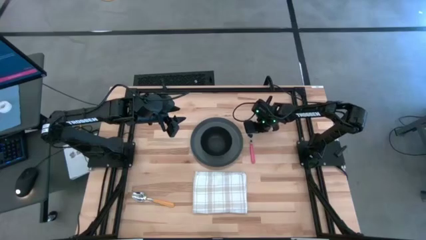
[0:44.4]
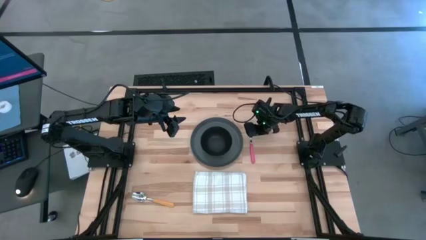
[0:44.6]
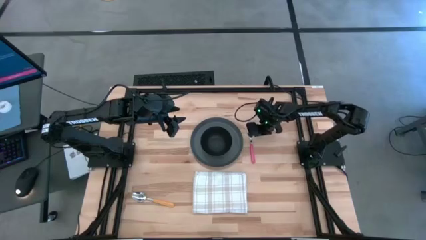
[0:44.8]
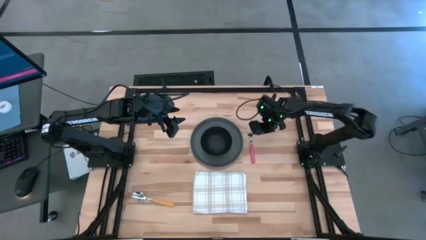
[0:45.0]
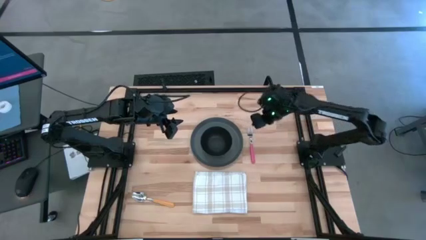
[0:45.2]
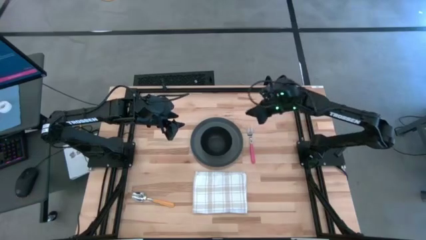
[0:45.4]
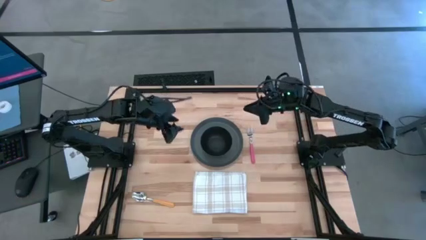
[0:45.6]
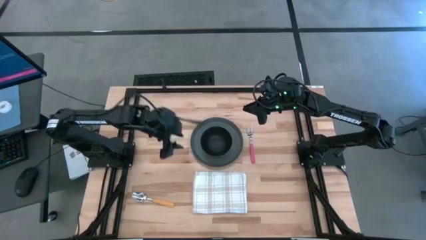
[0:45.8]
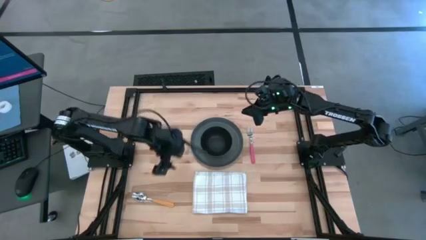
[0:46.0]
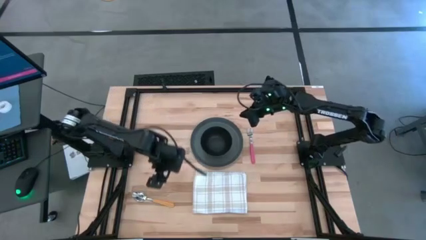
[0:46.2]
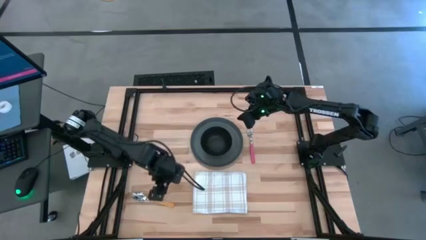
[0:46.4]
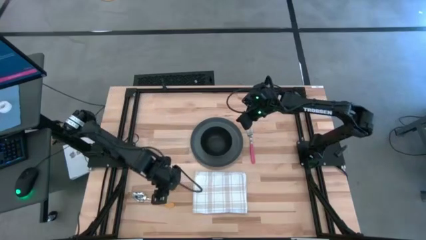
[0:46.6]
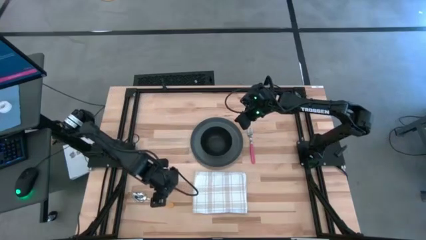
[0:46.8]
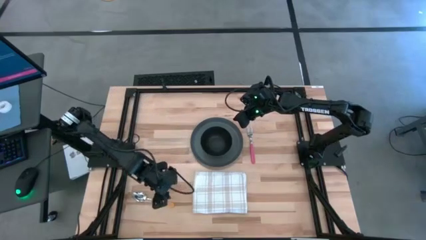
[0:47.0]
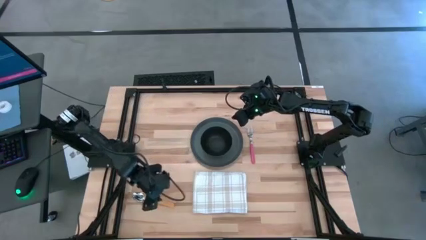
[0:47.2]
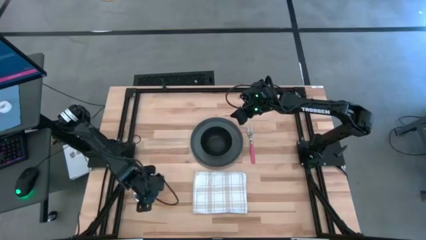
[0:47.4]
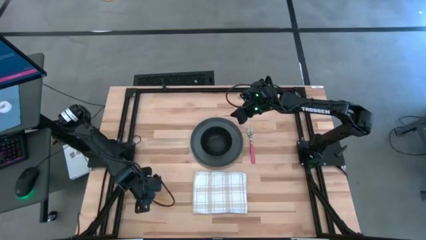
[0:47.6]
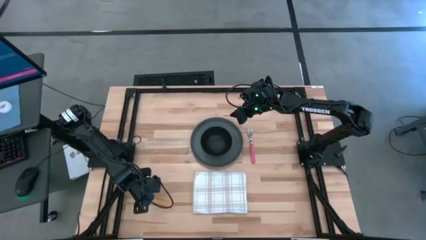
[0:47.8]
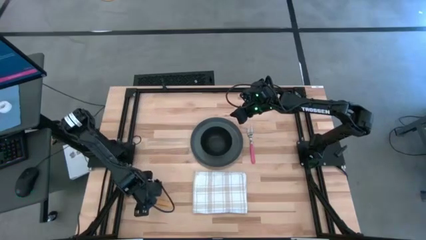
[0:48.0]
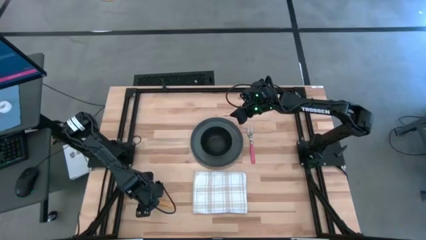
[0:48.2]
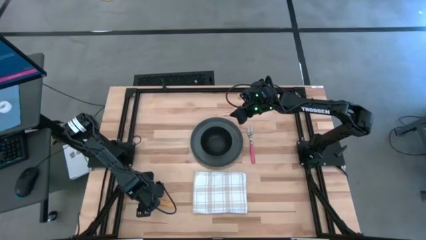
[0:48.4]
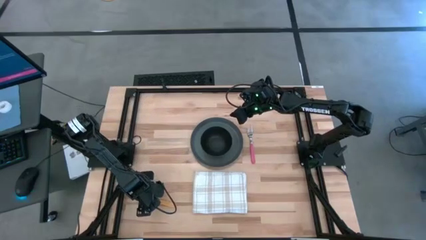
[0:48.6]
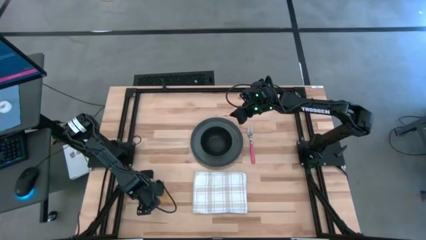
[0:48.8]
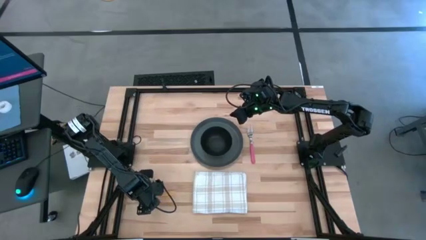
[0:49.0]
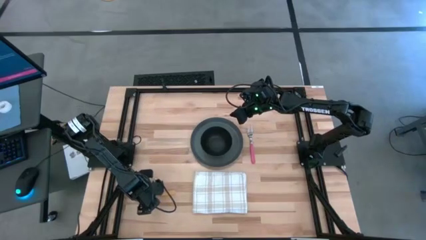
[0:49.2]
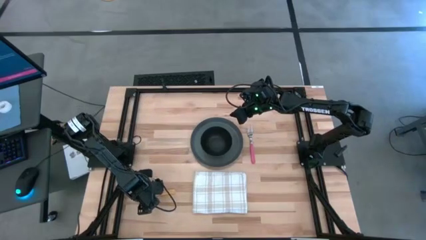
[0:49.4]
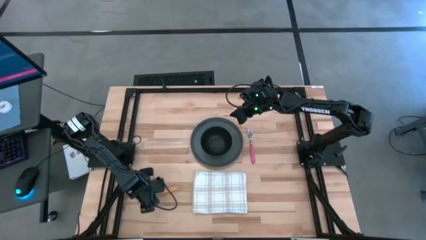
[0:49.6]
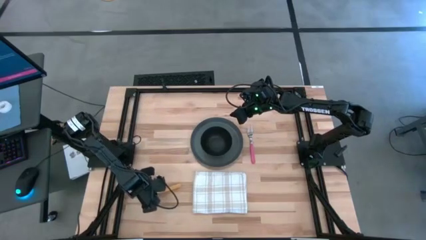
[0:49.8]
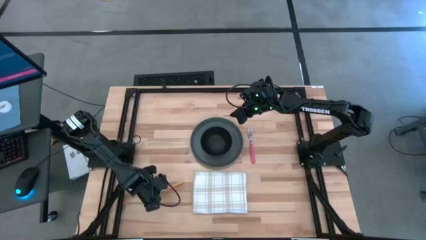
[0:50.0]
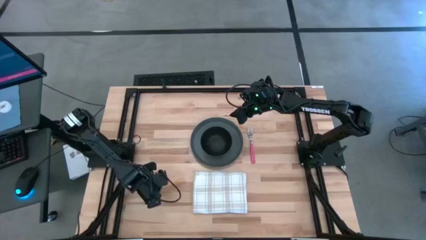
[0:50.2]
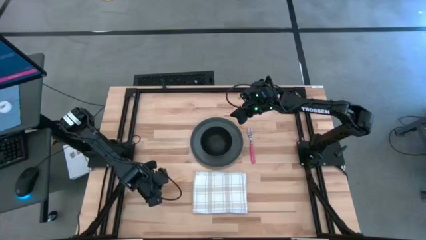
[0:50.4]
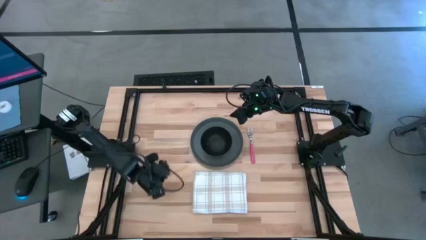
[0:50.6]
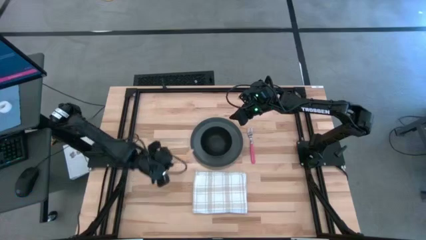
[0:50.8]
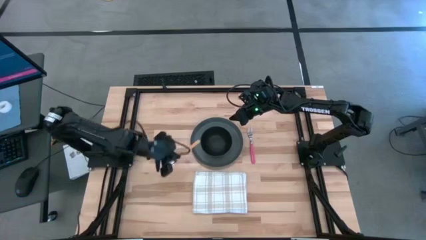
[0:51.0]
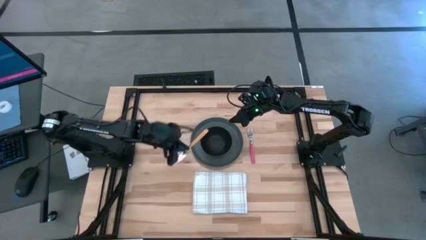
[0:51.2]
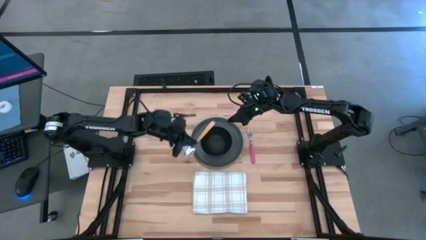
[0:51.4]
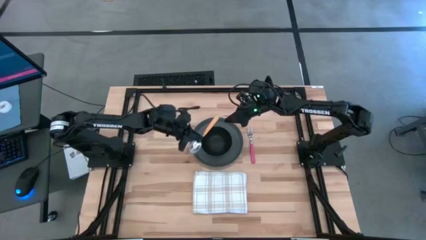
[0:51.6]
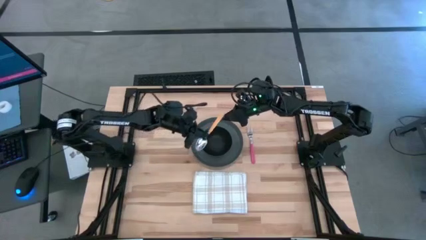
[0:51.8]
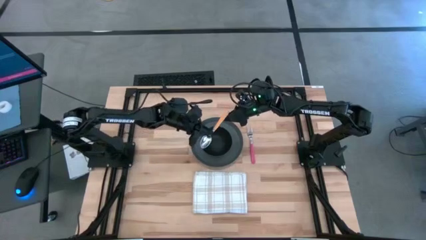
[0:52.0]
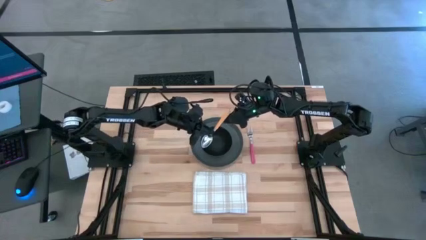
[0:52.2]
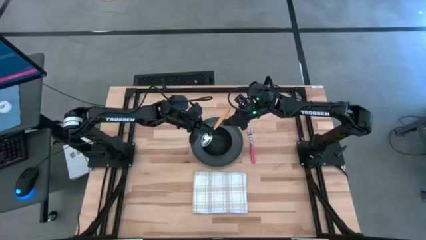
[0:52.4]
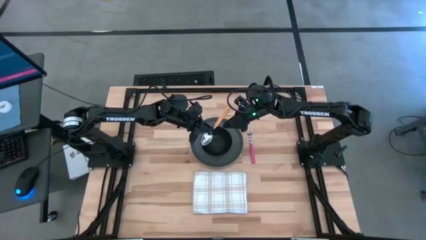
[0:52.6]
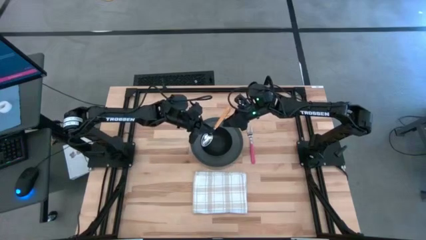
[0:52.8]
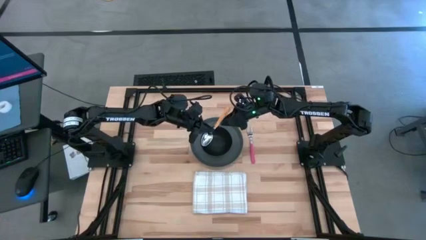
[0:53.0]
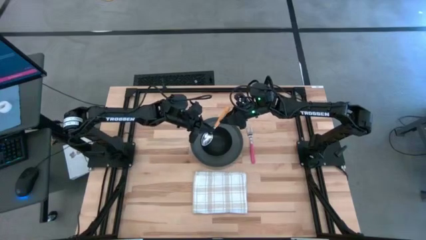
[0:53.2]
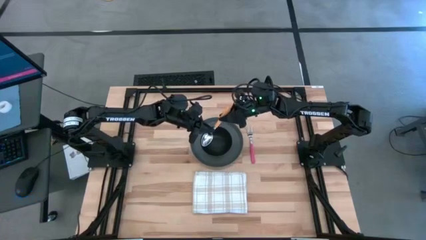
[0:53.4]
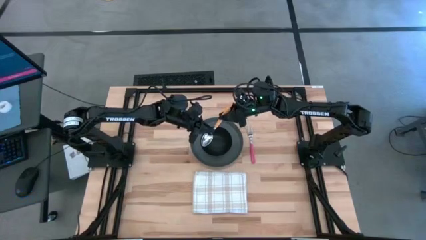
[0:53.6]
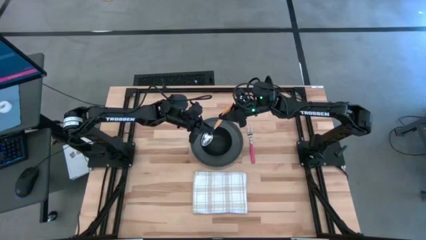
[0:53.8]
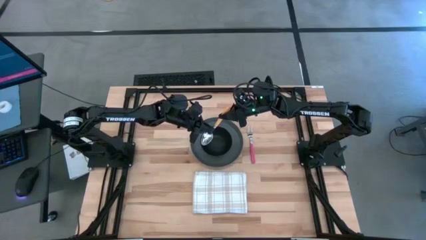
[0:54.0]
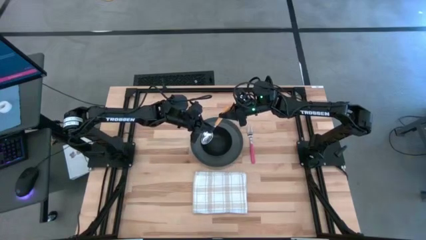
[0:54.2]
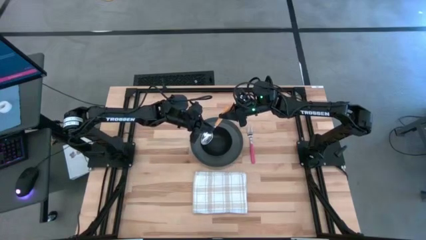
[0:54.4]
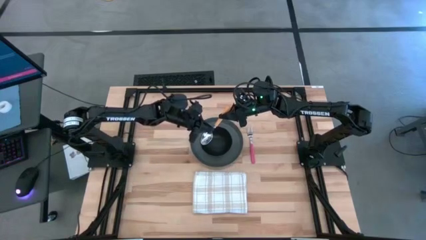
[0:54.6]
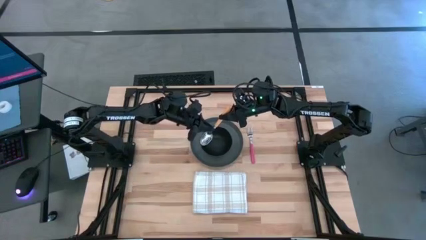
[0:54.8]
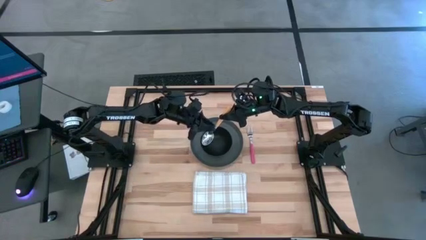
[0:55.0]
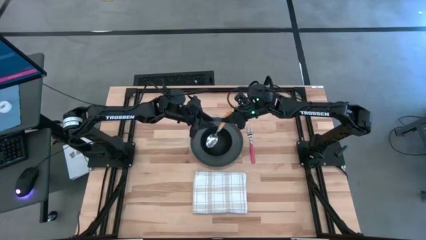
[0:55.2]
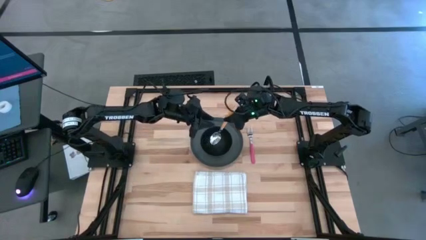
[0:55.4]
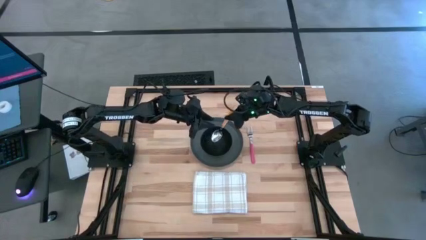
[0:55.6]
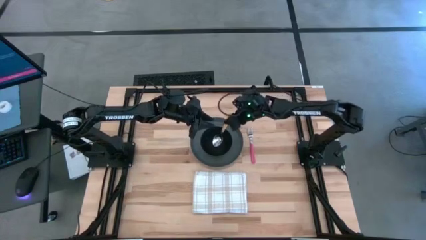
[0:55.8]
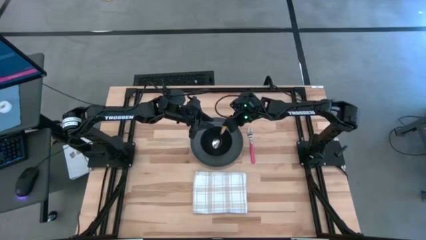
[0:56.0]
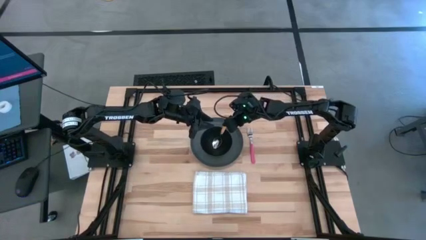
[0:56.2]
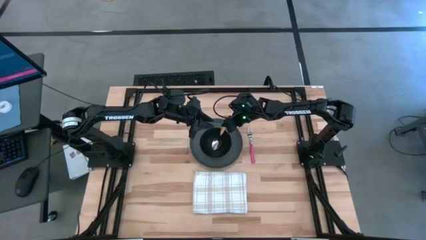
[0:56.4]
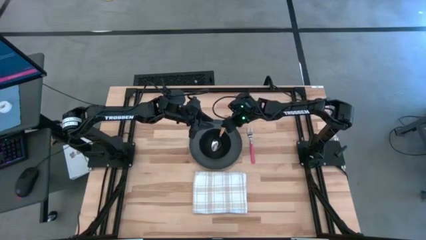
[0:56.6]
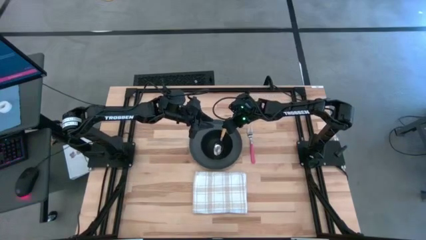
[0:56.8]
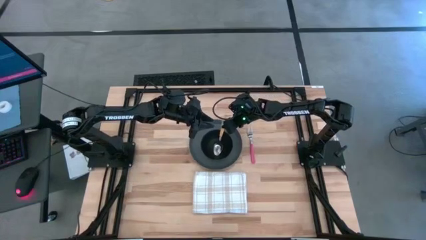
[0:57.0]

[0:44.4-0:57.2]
Task: Set table place
Put the yellow spoon into the black bowl

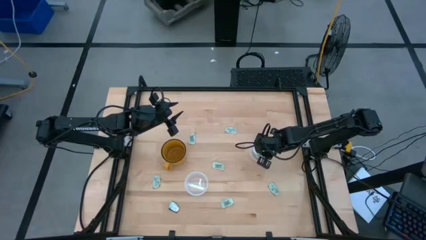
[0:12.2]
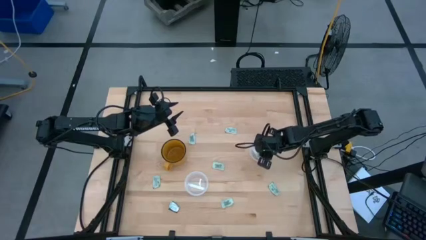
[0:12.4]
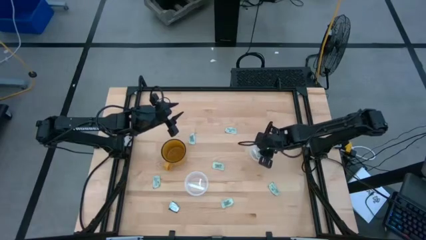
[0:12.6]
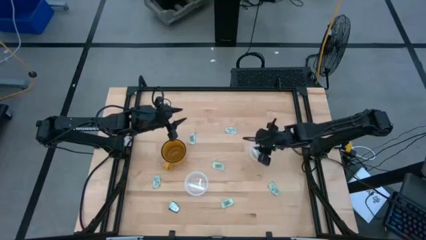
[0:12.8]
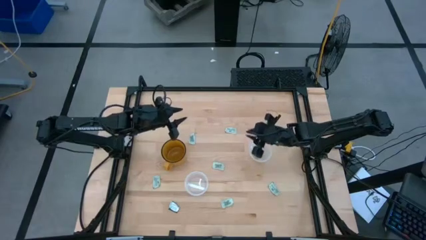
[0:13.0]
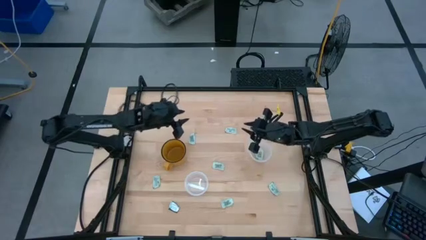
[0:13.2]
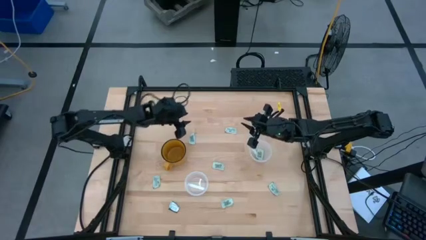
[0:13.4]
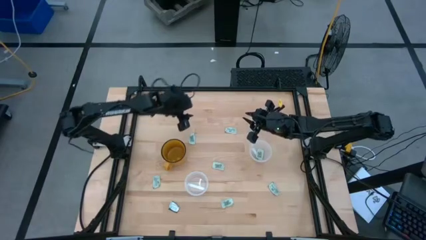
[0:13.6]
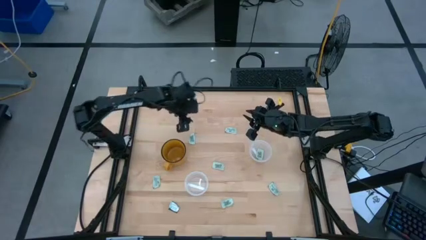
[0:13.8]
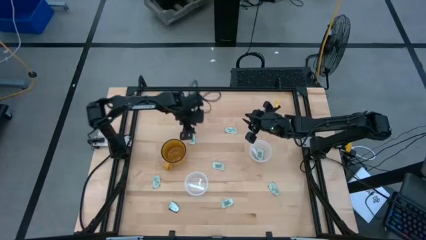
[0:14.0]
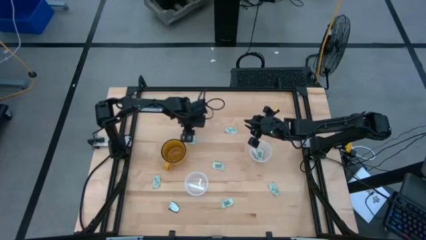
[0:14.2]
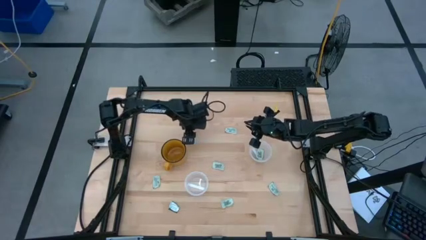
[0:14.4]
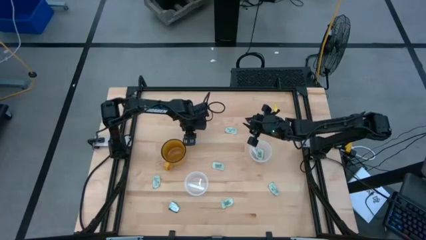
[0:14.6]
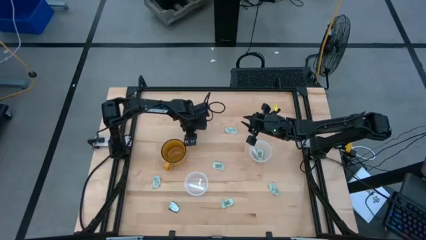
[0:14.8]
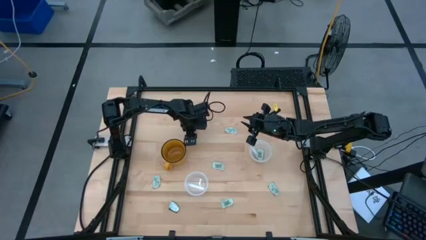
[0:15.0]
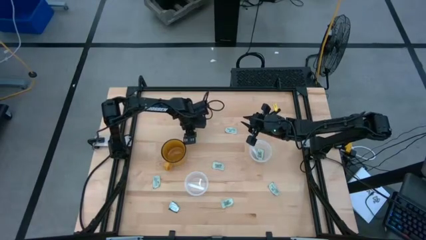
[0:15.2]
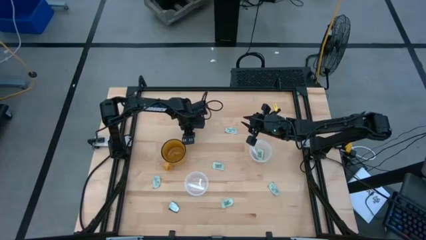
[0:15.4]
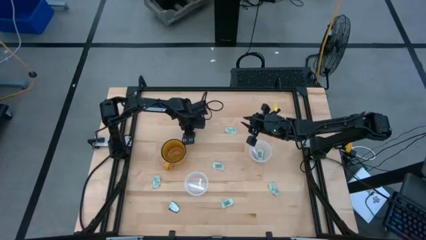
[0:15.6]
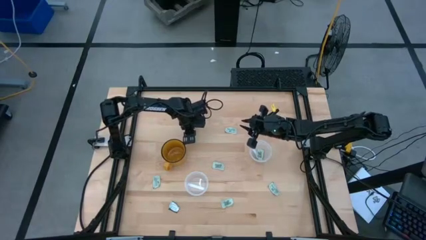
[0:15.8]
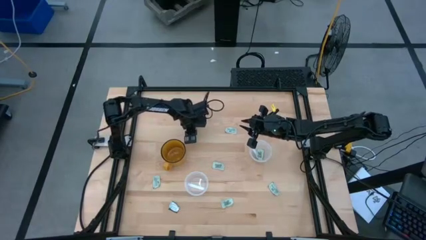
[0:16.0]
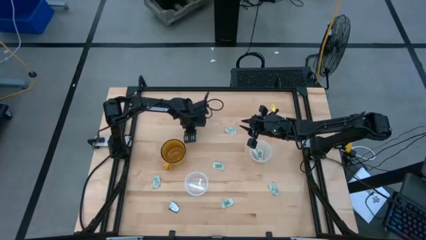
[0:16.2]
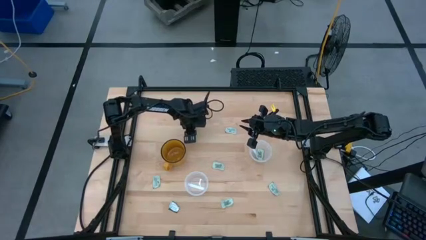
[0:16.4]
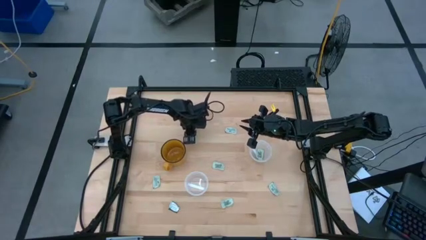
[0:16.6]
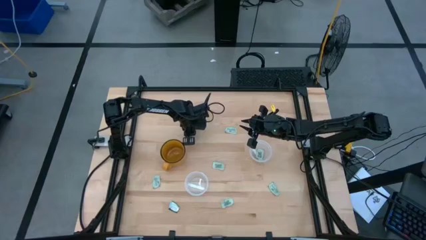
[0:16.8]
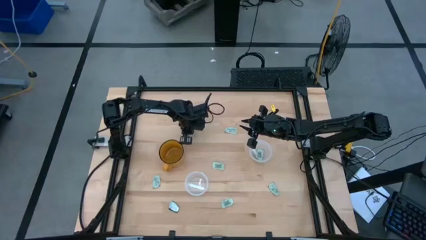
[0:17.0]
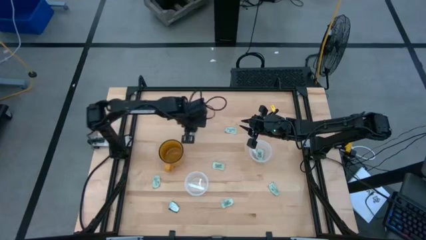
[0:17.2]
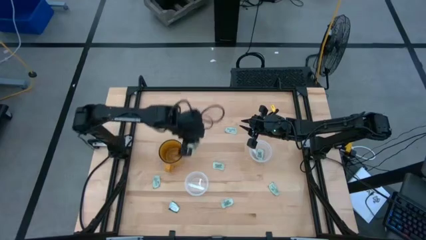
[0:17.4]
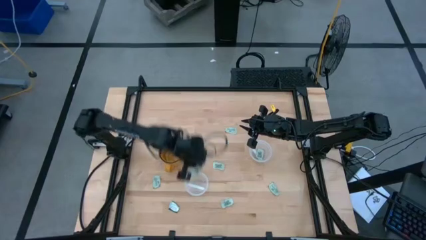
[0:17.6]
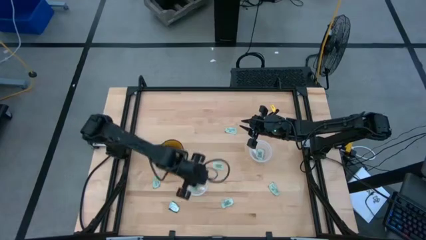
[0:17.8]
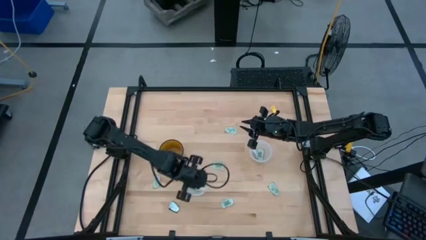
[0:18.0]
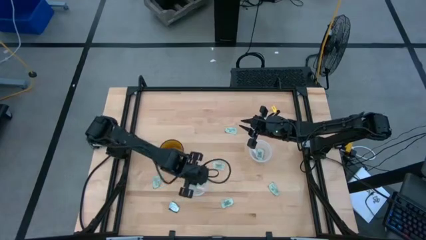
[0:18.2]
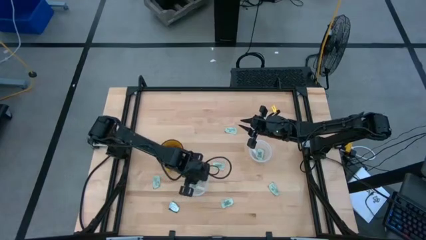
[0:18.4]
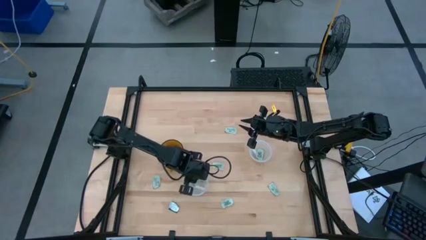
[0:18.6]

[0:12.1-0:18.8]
Task: Pick and place Stevia / Truvia into bins
Put the white stevia packet into the left transparent container
